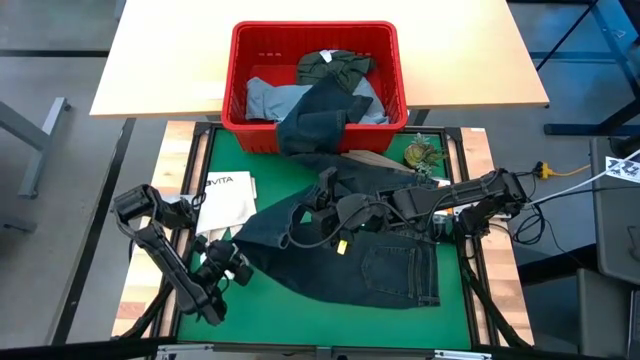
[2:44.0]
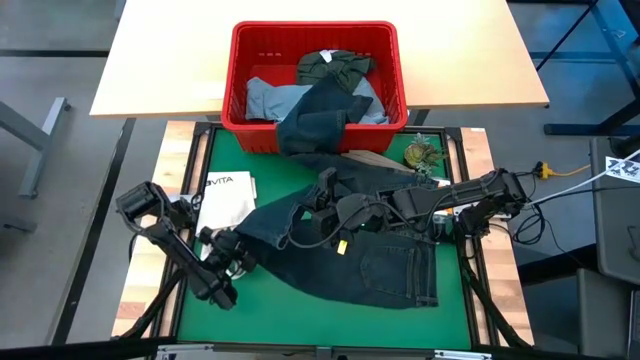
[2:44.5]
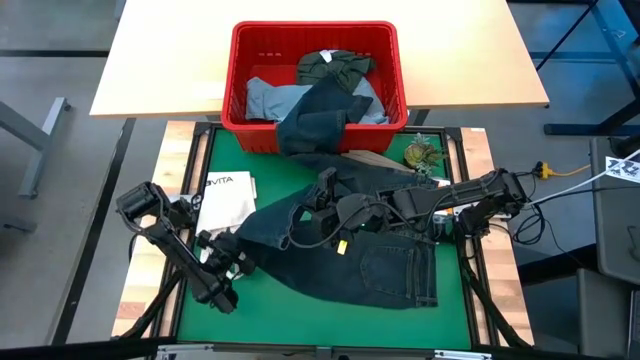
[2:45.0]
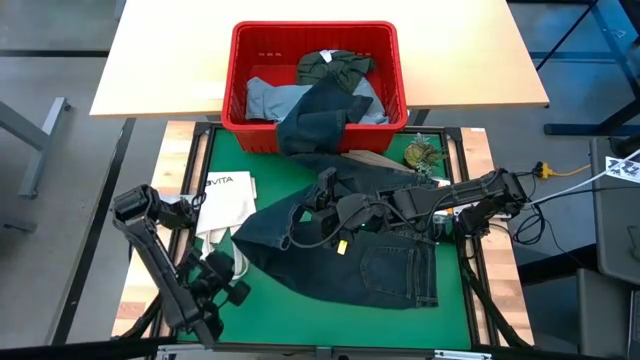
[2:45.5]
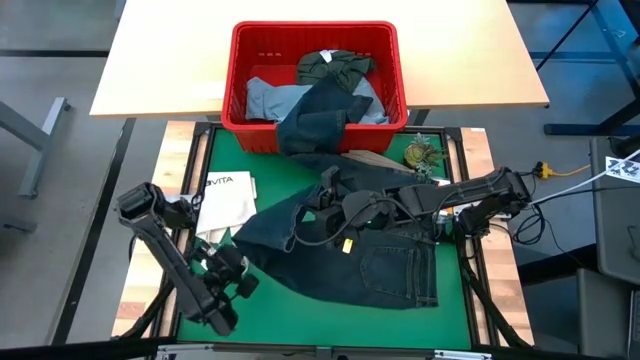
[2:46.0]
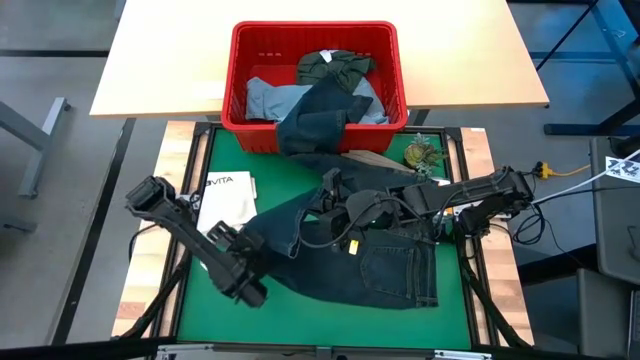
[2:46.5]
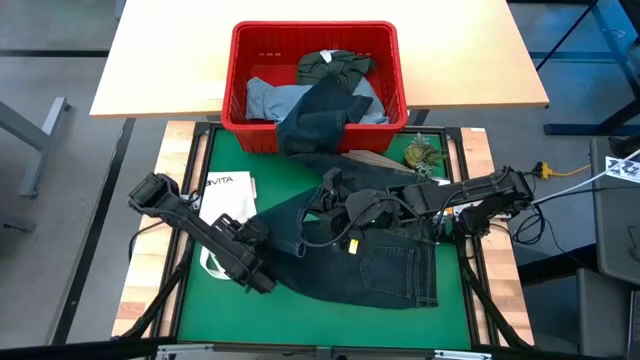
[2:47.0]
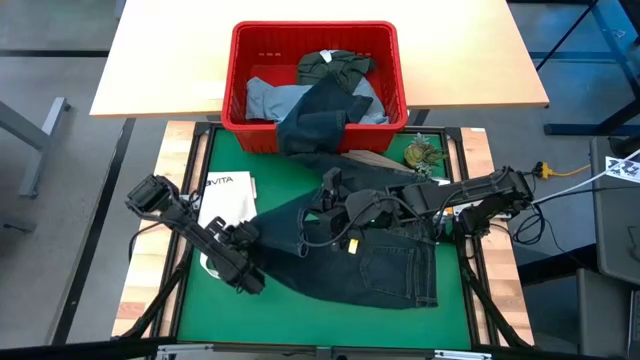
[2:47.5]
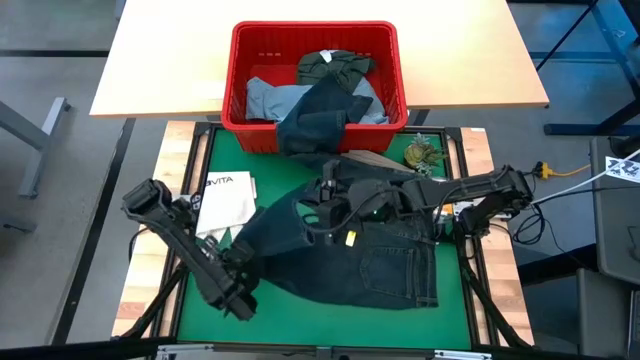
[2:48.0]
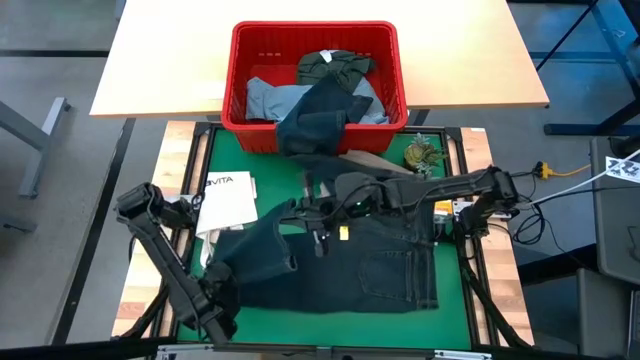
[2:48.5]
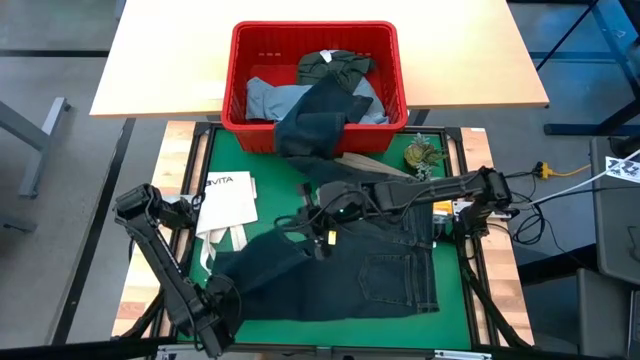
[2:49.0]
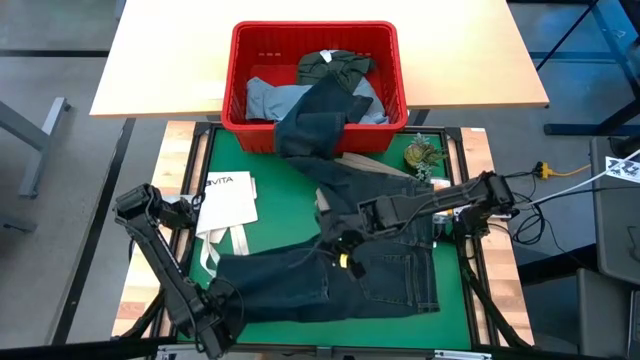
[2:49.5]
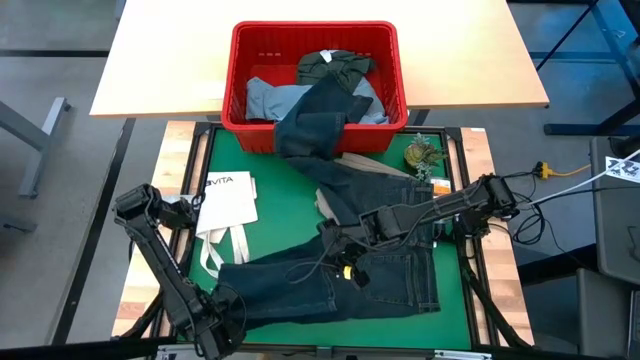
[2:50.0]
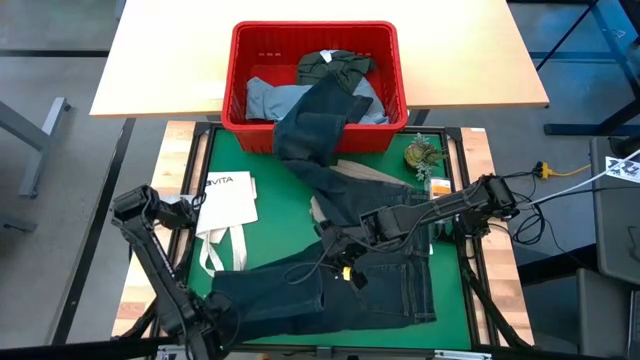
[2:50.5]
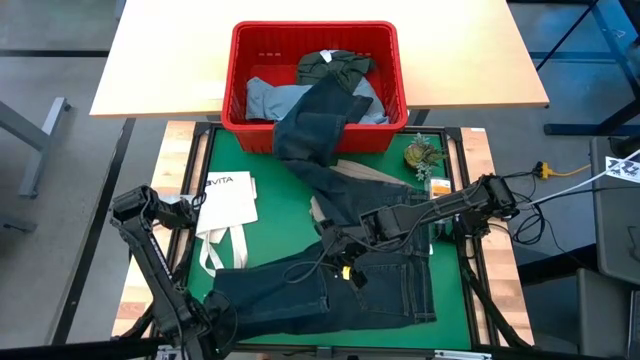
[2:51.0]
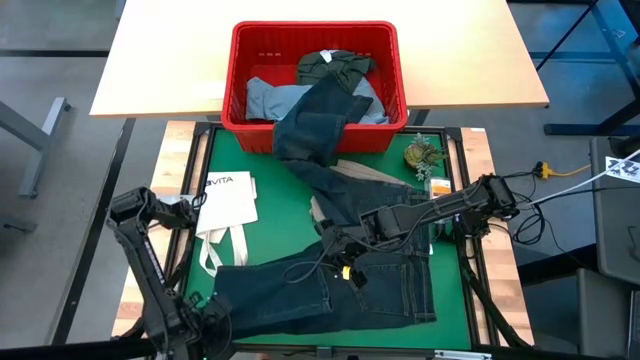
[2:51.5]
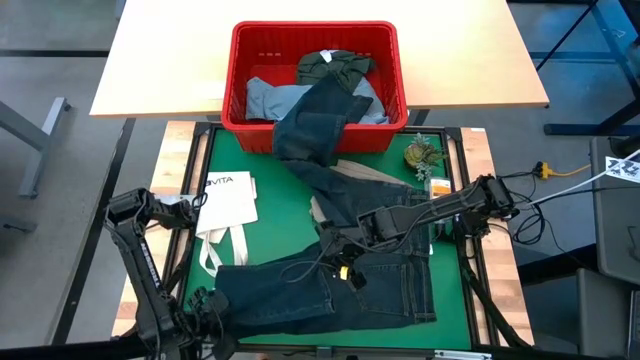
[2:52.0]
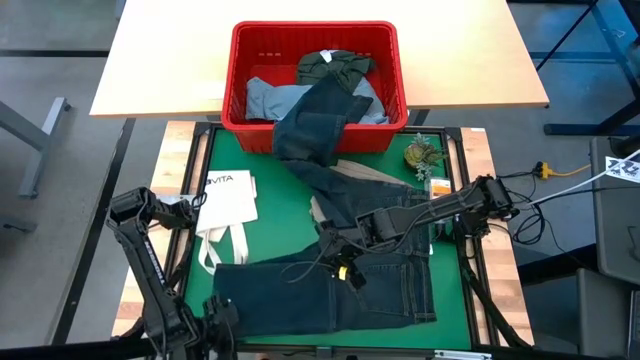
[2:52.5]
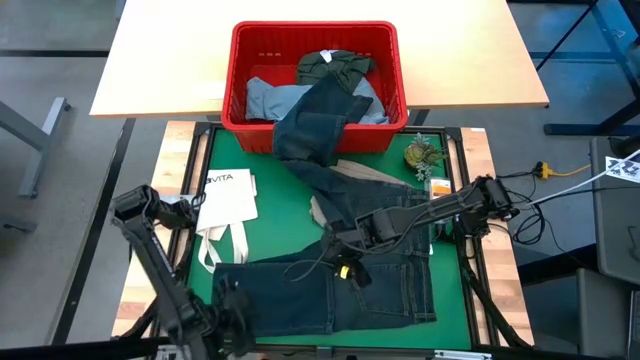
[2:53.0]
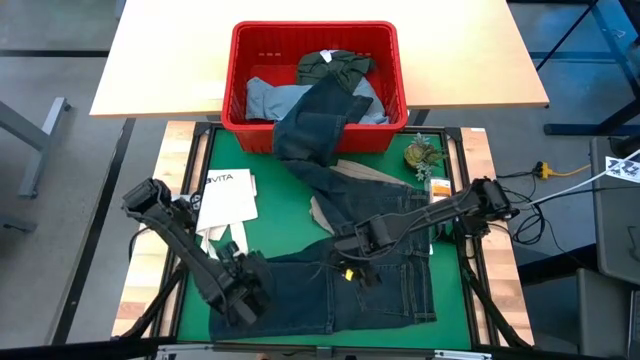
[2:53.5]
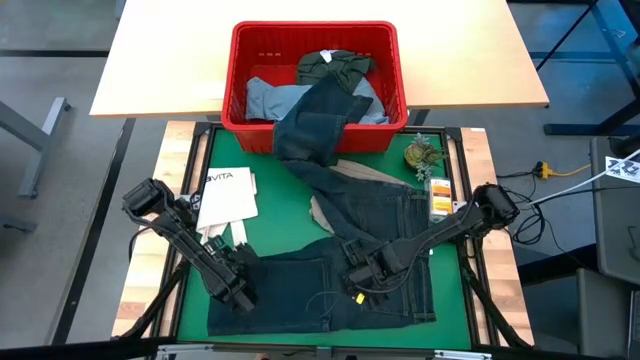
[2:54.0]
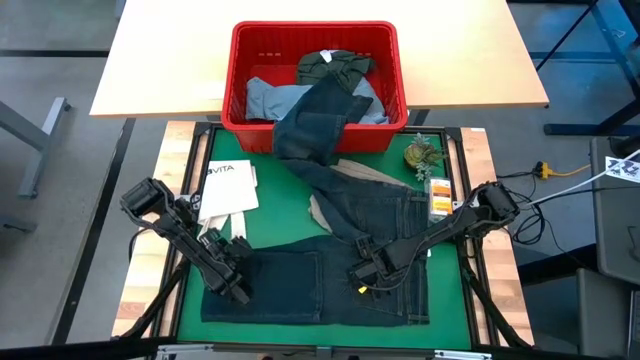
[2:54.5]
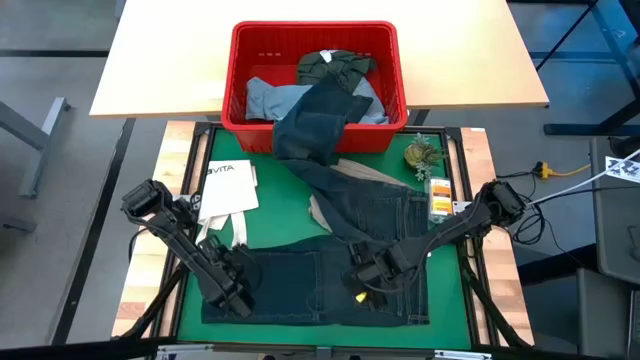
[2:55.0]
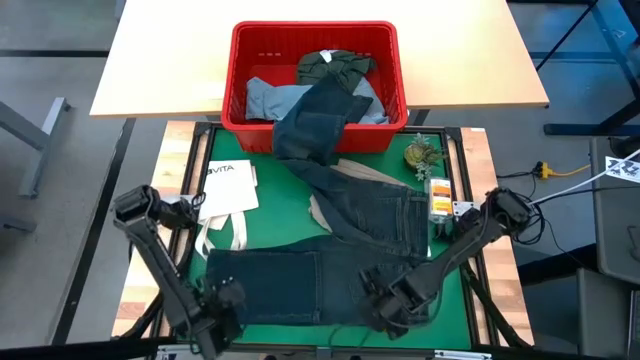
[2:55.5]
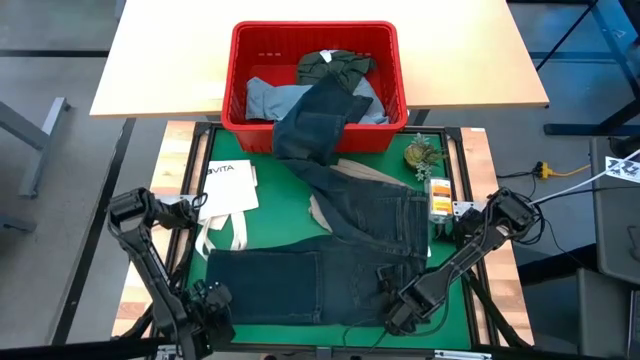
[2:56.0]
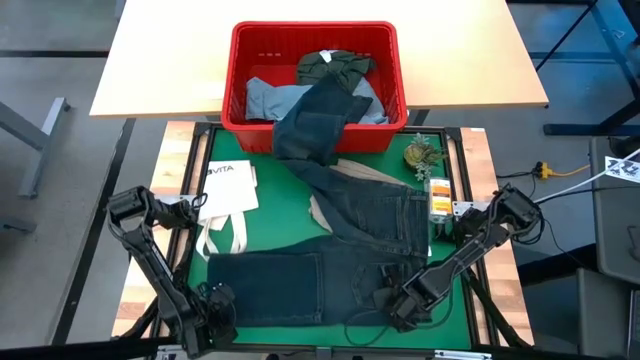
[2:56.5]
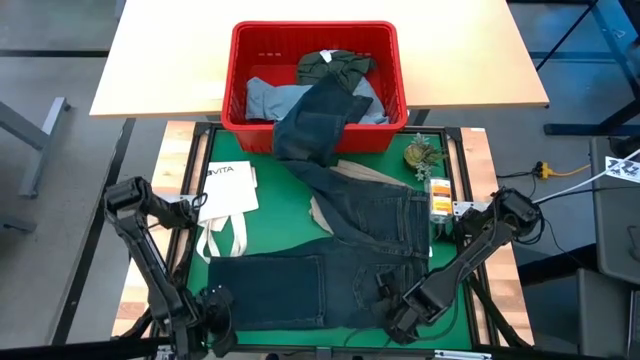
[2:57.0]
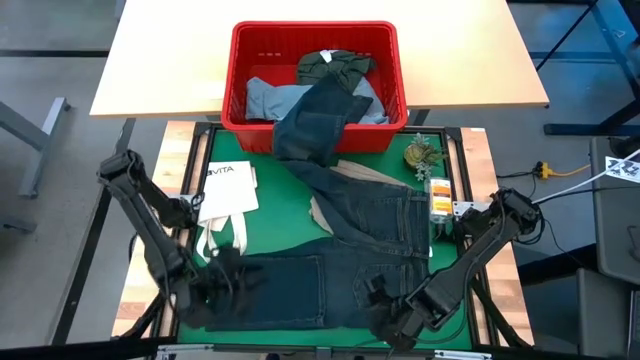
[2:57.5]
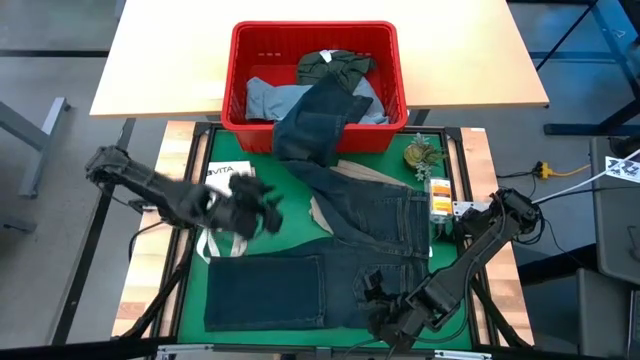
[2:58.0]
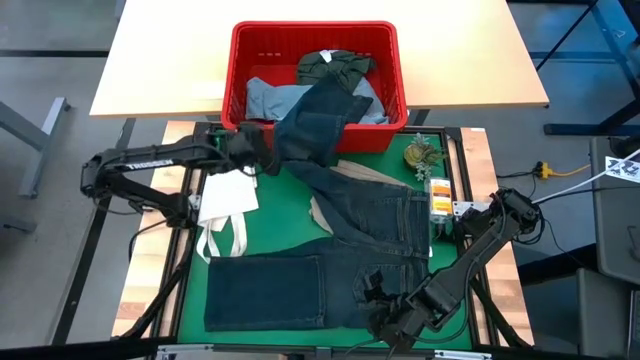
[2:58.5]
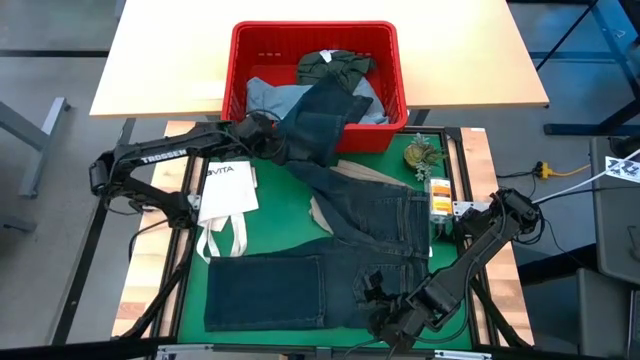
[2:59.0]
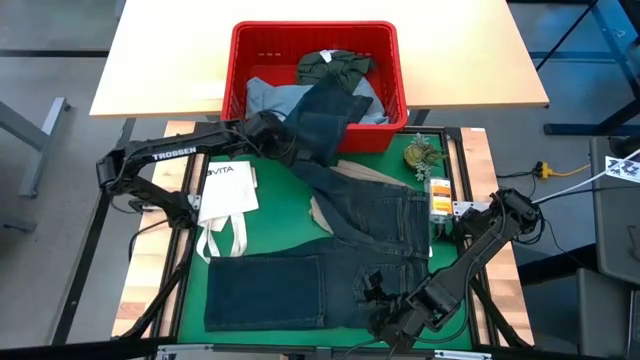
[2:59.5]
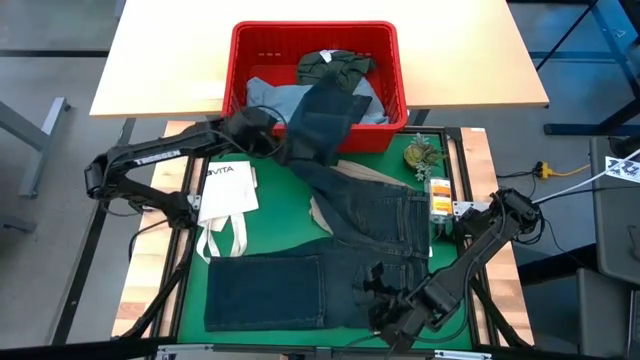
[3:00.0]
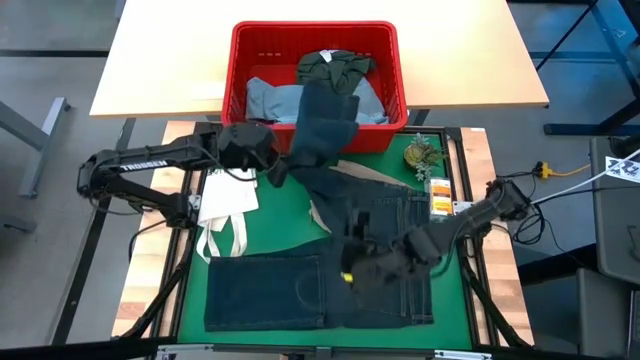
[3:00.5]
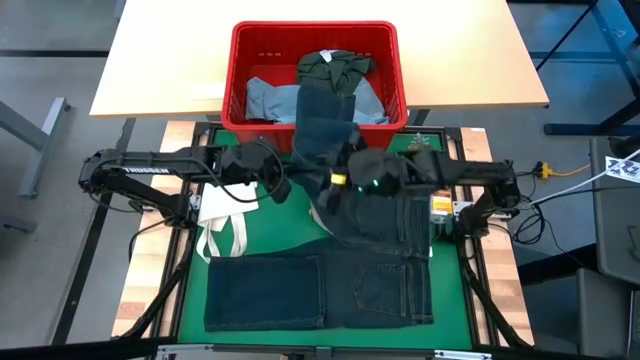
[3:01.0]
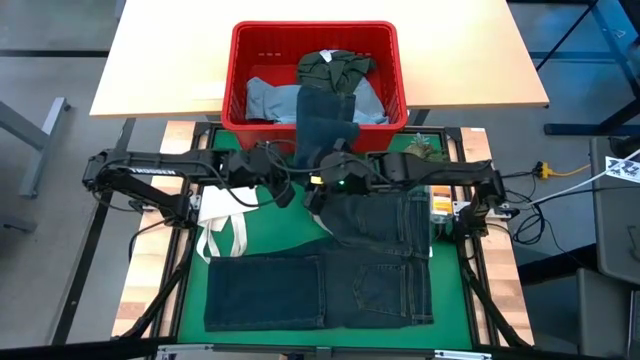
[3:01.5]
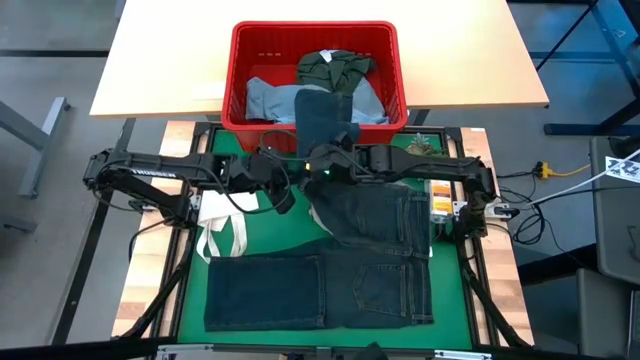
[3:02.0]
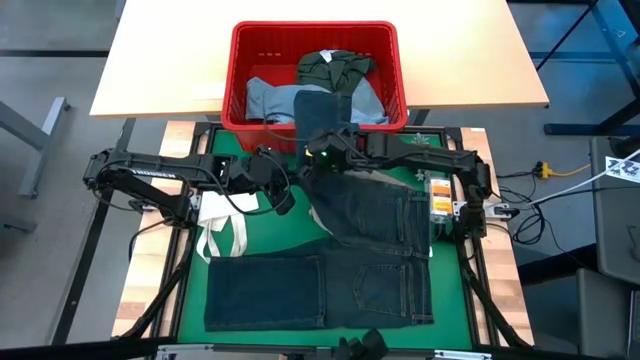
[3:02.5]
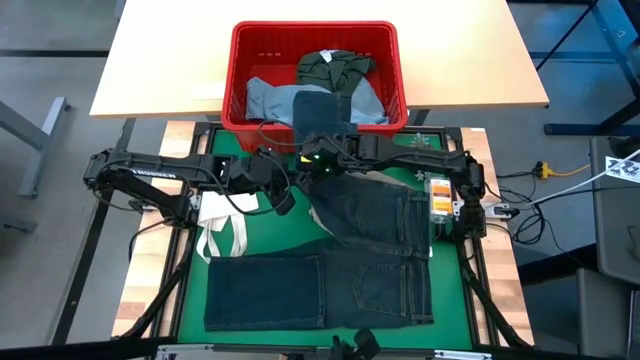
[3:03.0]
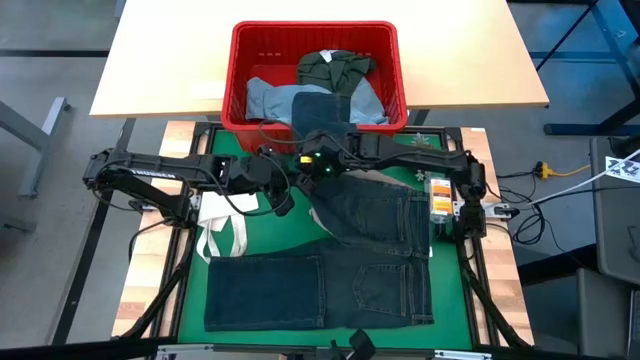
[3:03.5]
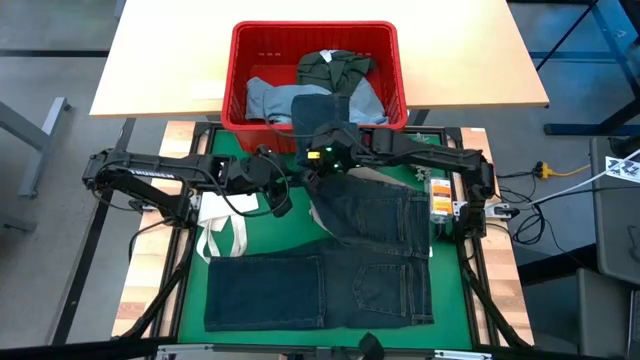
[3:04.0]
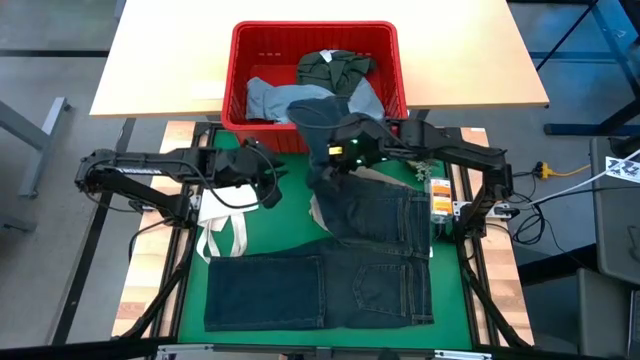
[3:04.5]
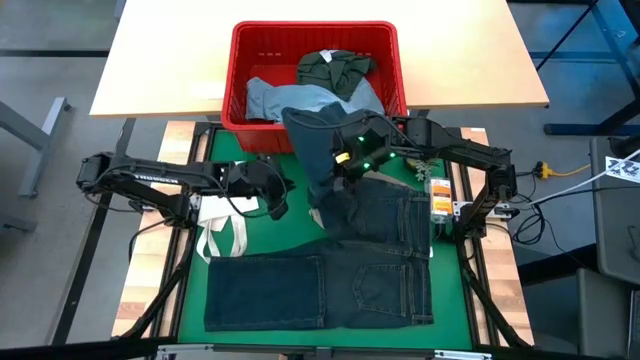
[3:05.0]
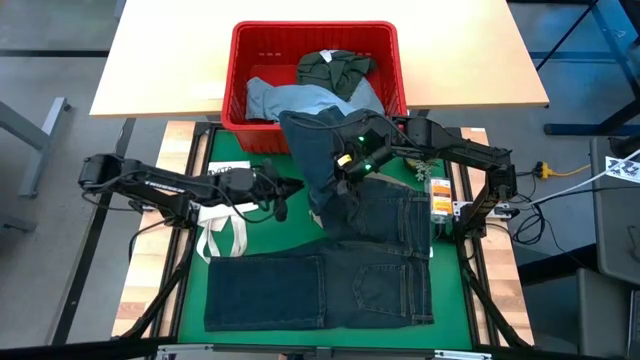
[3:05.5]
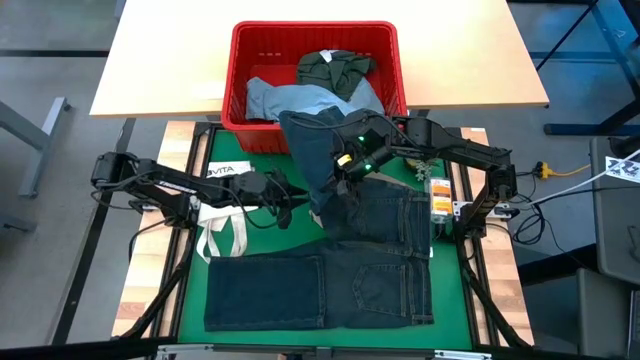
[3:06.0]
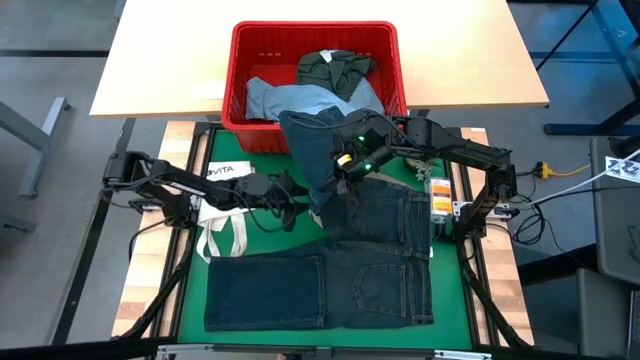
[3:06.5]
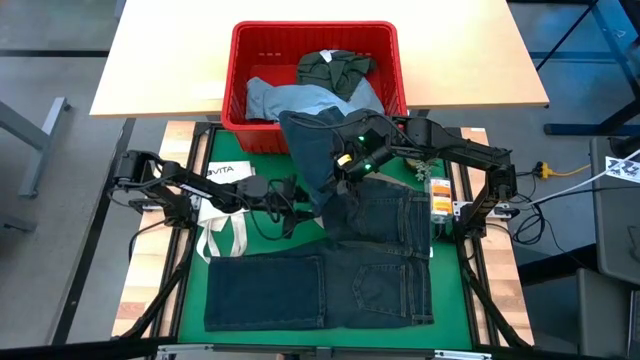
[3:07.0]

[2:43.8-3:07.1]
Task: Fold Laundry from Bin
Fold the dark blue jeans
